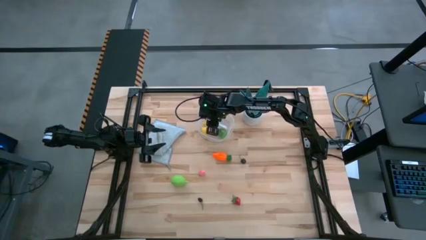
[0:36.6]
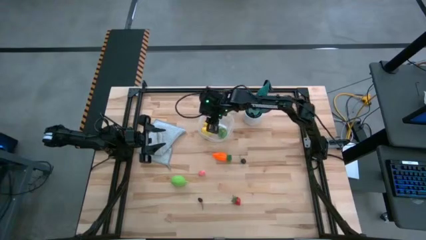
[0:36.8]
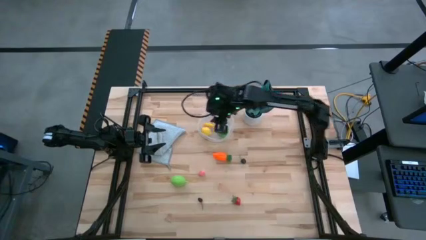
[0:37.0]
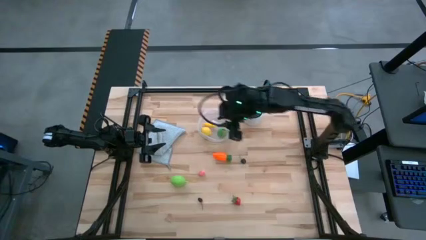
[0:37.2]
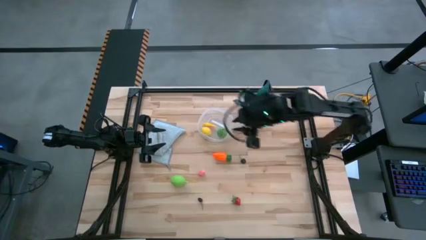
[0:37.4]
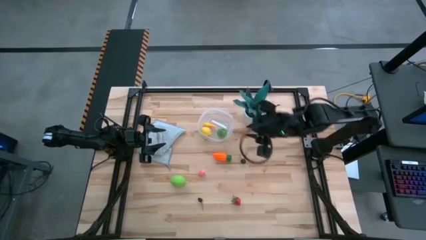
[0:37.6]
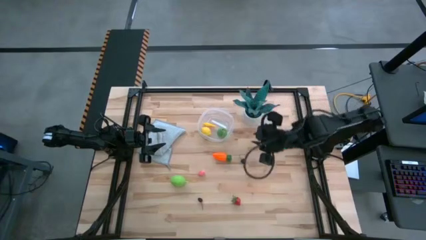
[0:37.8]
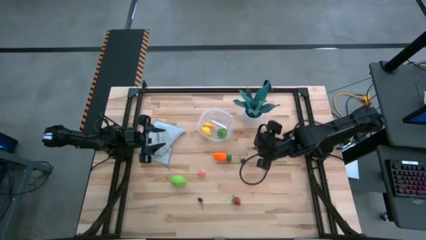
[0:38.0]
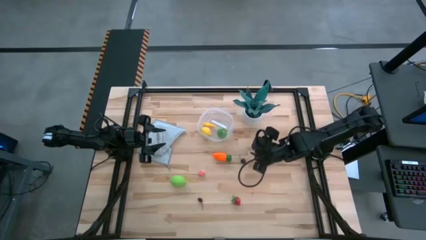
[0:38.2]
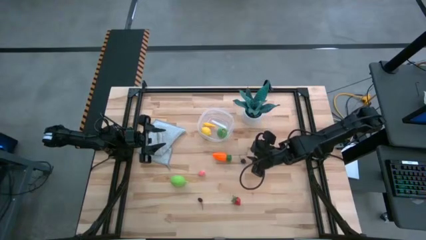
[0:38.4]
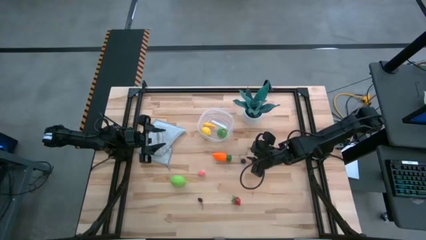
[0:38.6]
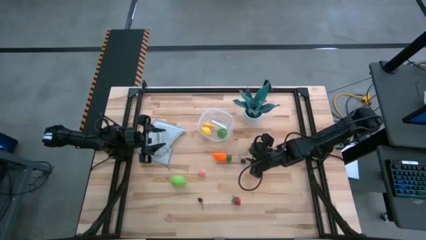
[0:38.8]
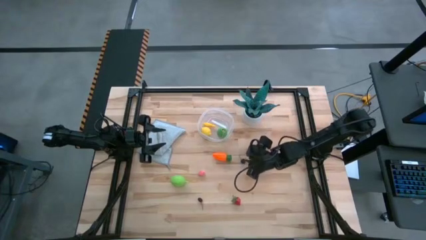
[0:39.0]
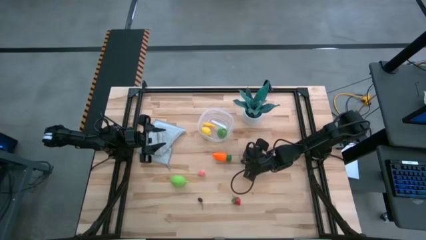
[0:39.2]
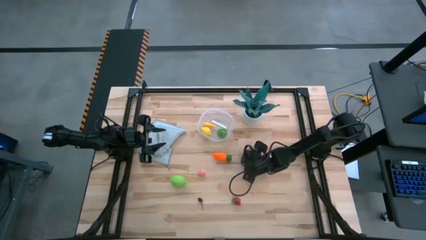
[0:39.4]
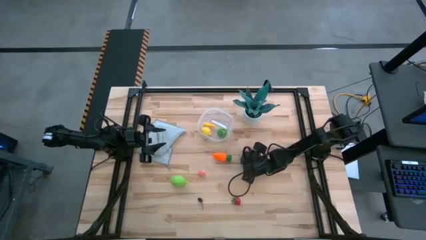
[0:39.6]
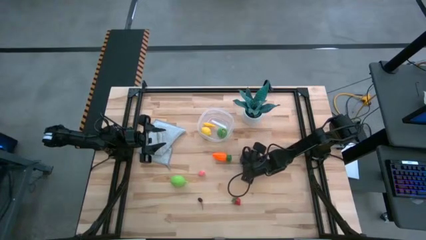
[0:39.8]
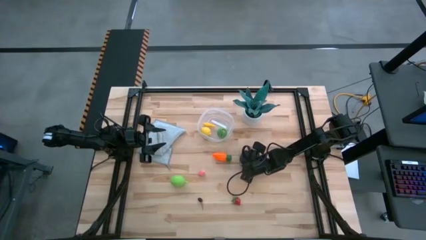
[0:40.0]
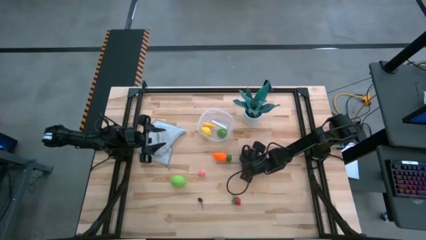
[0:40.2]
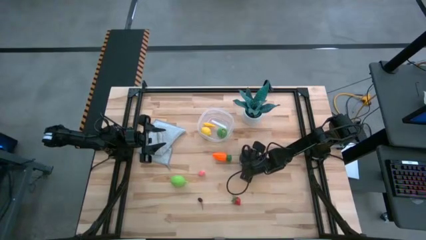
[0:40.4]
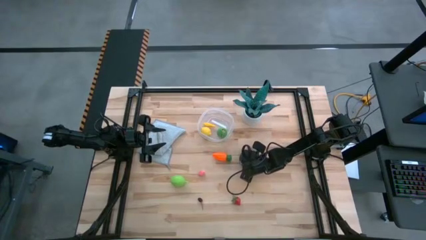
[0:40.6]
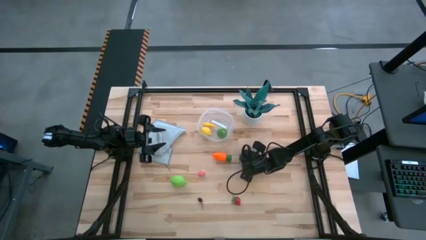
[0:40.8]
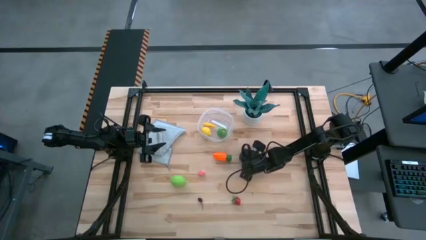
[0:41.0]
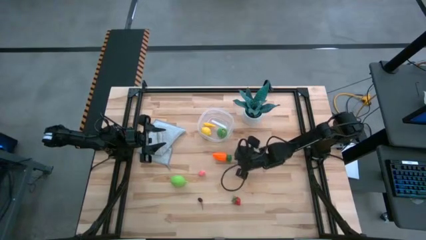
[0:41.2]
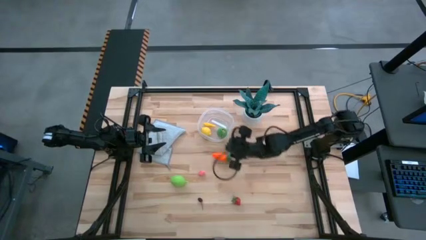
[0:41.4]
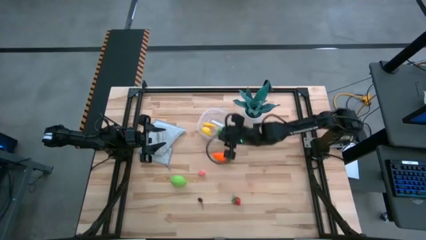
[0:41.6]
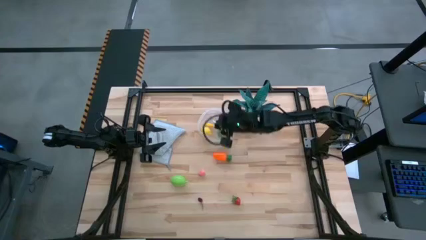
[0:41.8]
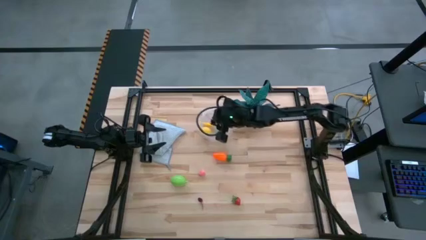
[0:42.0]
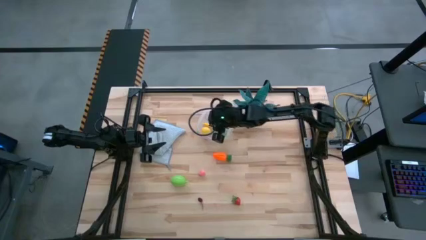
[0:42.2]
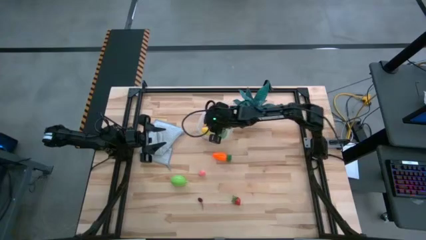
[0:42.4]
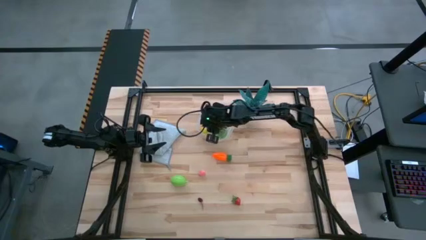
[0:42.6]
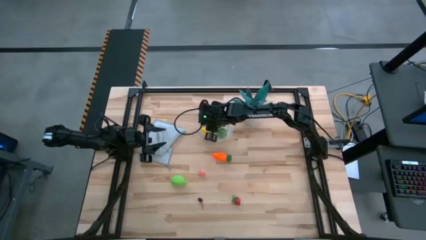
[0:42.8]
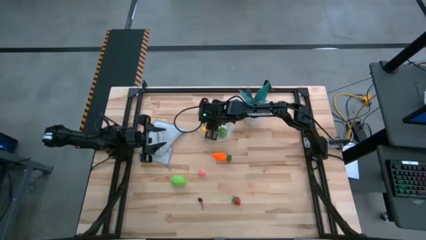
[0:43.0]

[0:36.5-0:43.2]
Task: Pick and placing Produce into tupperware
Put the black cherry into the transparent container

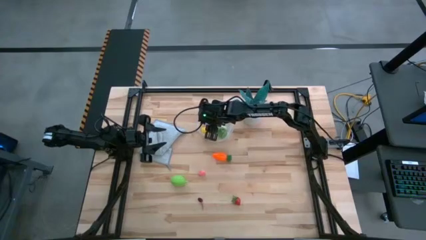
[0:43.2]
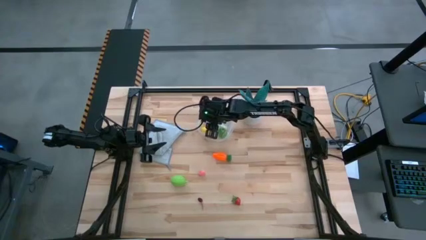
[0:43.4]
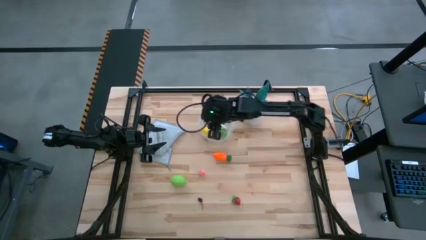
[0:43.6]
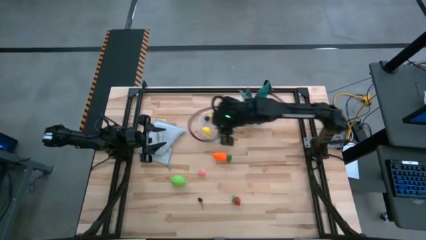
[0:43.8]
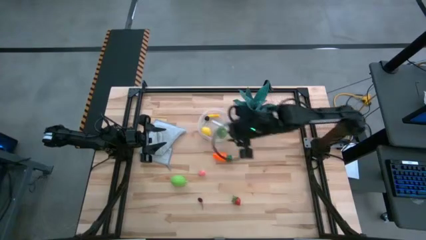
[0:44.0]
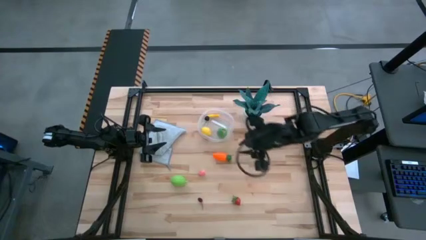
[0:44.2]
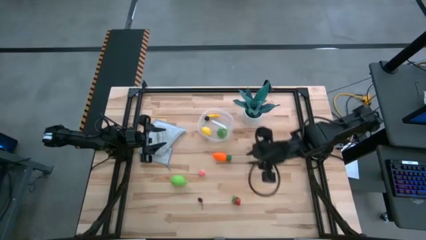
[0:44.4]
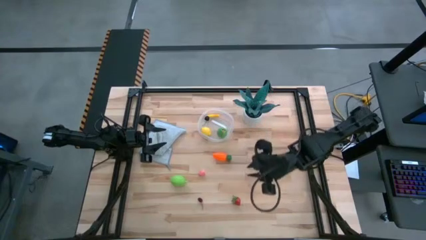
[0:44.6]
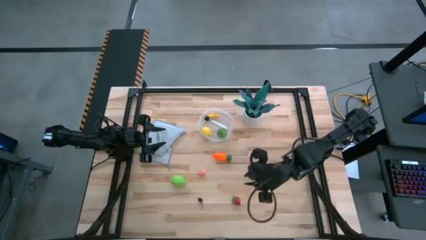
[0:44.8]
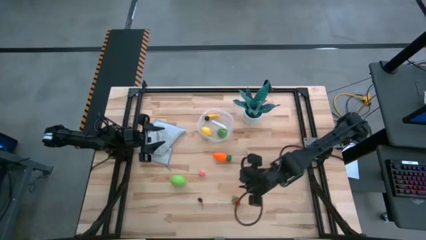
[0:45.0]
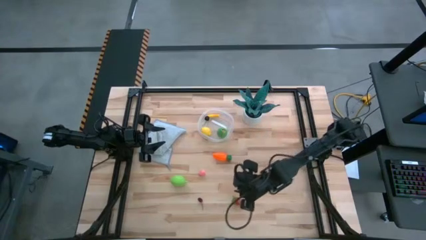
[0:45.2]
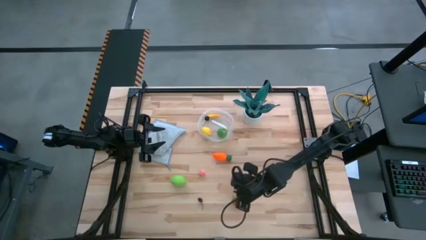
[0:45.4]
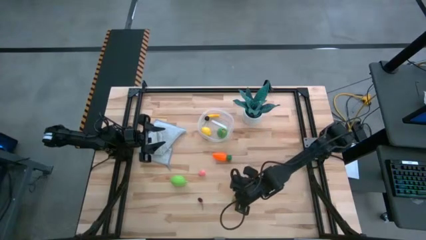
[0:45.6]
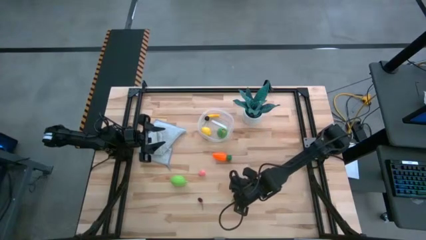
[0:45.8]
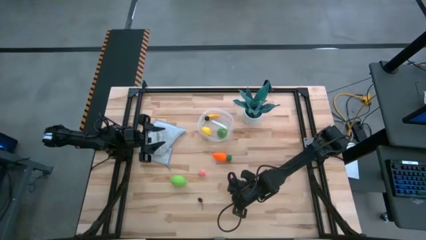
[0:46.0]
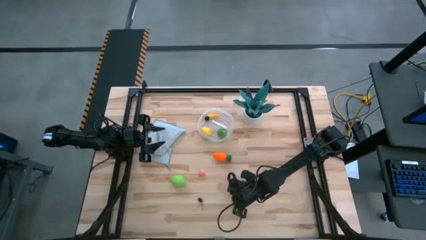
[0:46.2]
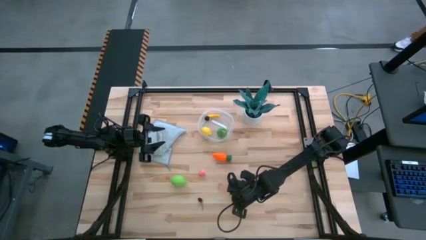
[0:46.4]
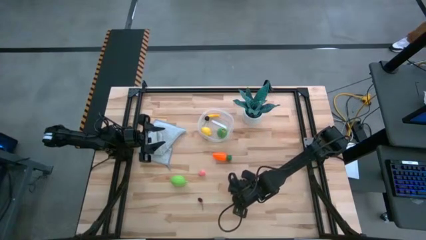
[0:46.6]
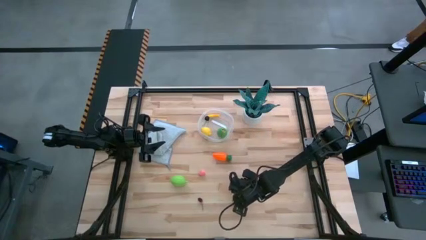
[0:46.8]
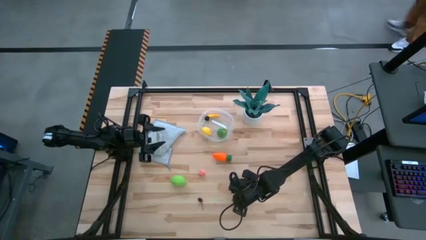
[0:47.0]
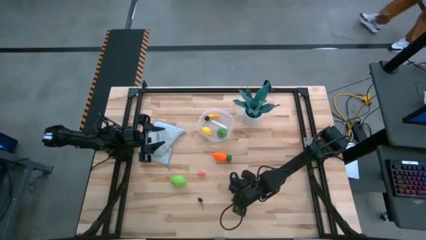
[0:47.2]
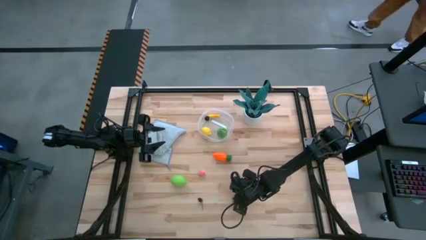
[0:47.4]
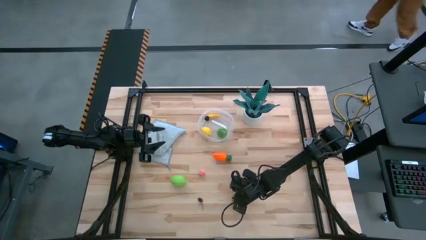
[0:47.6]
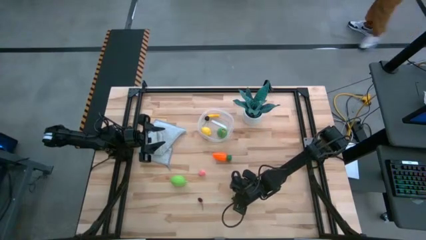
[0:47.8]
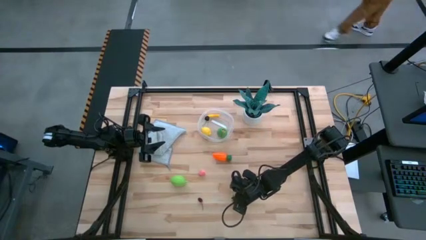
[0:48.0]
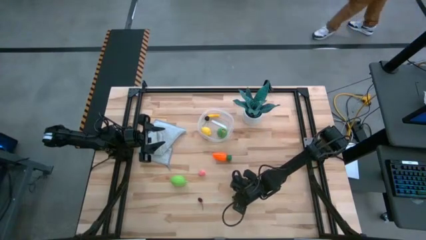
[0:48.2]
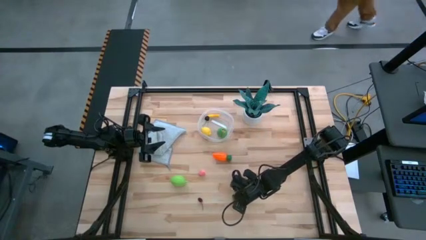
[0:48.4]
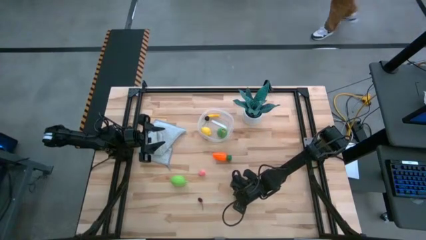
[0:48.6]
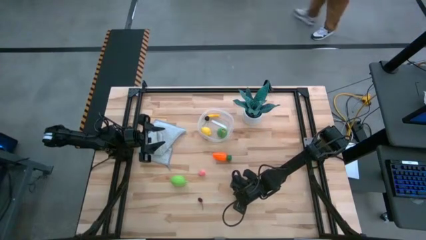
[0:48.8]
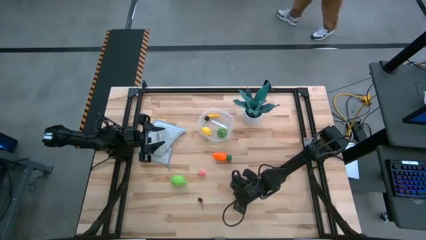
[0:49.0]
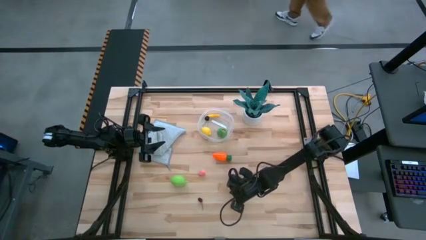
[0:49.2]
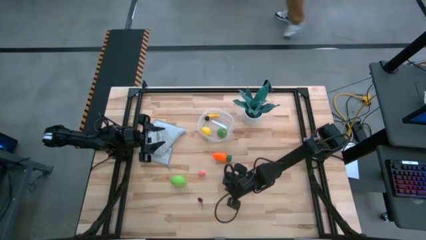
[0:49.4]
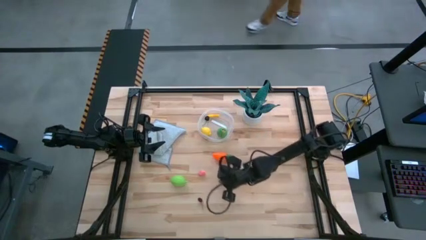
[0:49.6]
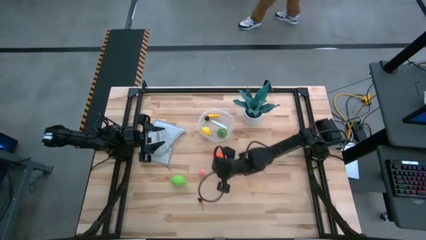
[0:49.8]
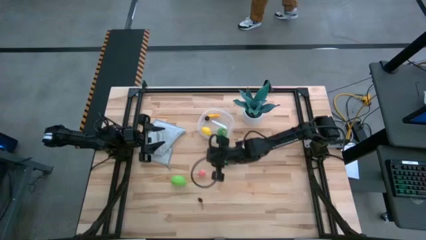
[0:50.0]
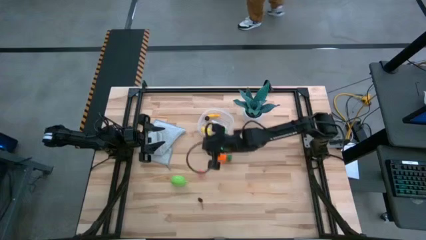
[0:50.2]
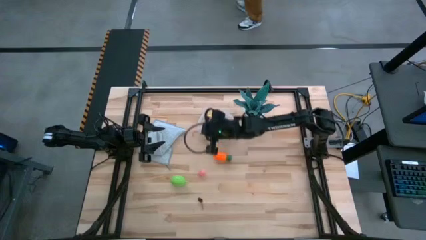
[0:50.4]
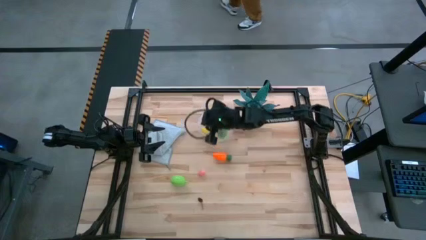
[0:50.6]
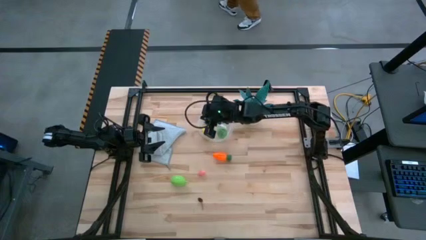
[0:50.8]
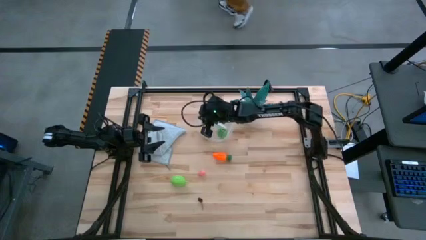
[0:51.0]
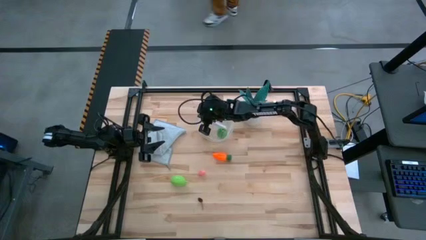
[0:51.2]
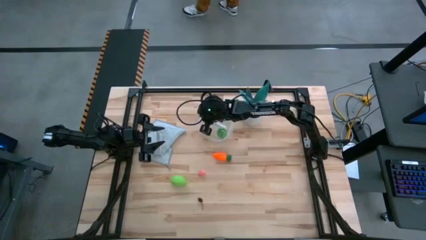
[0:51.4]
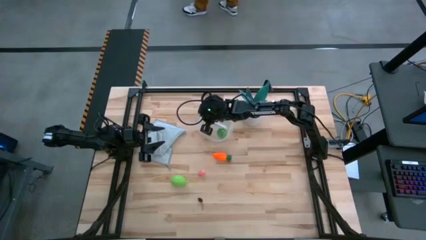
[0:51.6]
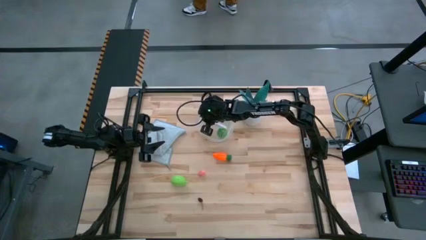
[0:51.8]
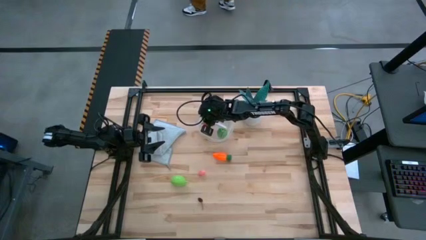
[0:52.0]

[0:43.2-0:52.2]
Put the strawberry into the transparent container

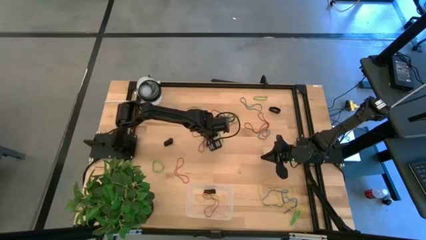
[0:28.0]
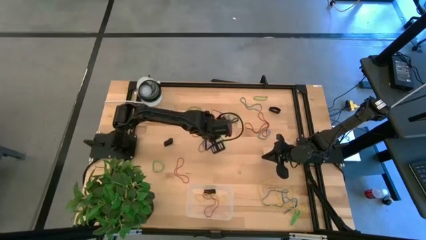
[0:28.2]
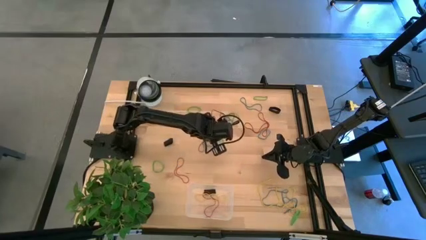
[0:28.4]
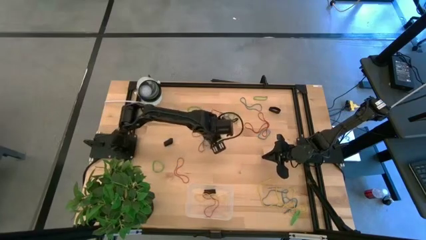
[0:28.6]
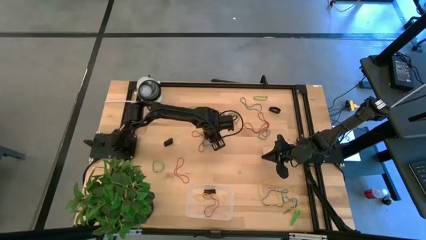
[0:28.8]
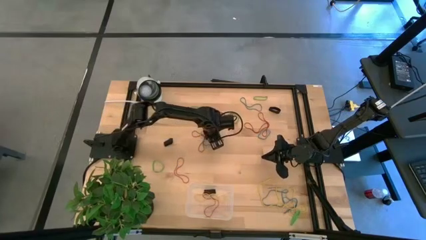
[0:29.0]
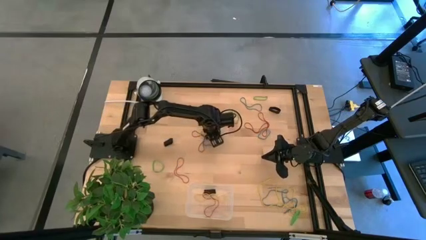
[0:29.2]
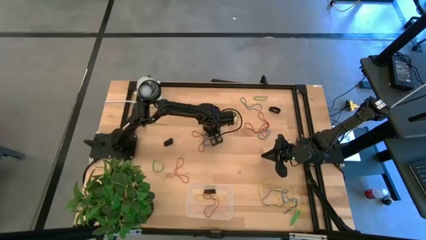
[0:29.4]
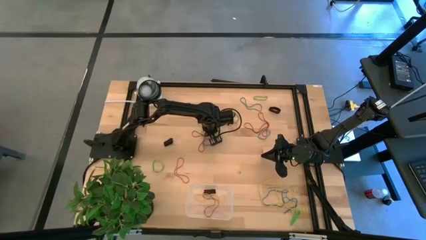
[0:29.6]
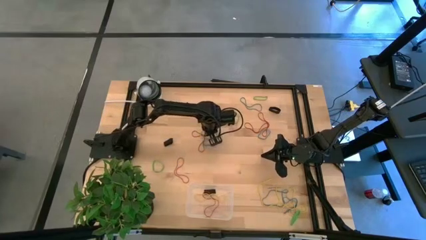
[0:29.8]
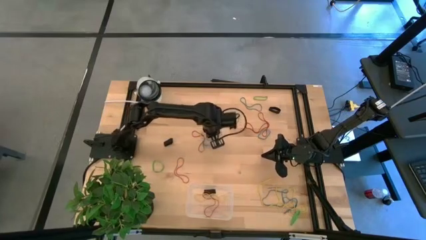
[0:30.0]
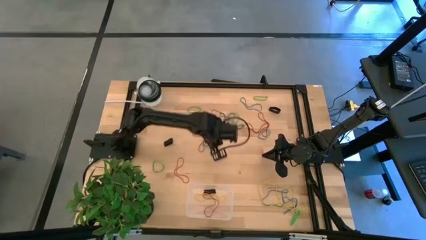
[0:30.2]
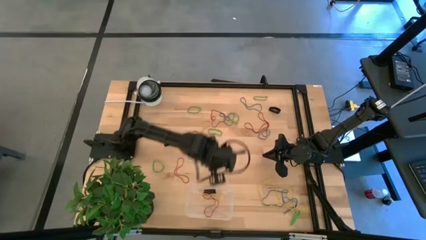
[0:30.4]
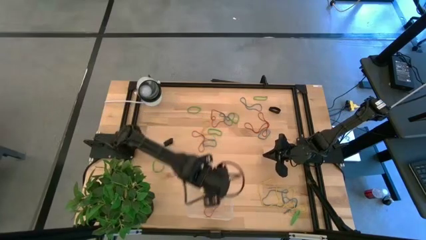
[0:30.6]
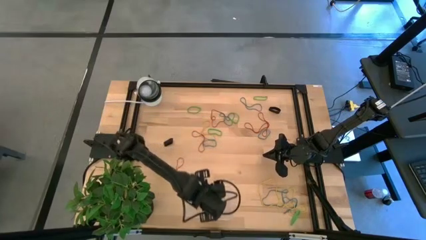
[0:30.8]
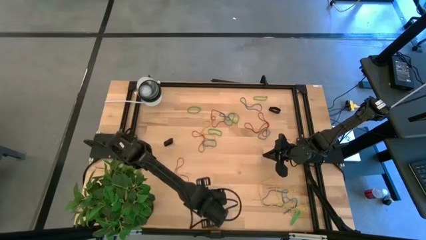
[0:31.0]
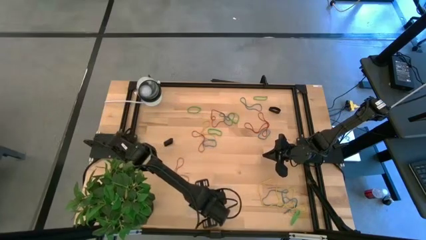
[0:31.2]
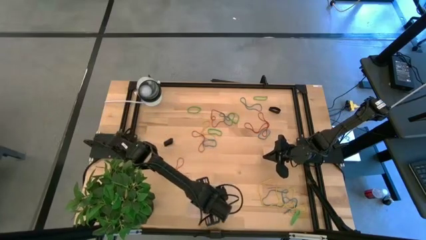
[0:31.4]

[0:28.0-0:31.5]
Task: Pick and place rubber bands into bin
Put the black rubber band into the transparent bin
